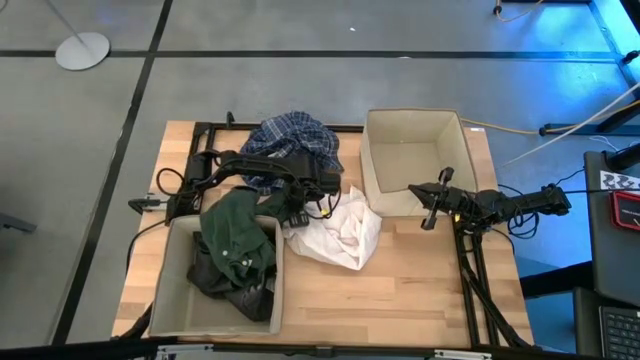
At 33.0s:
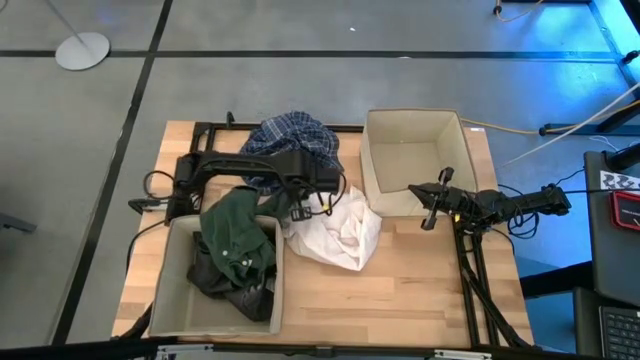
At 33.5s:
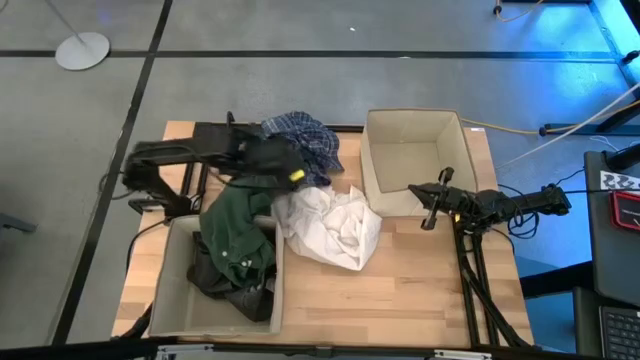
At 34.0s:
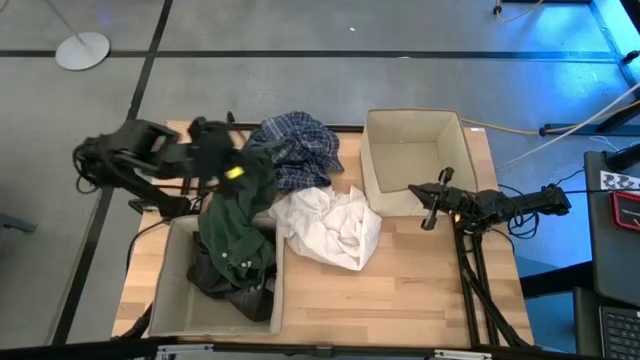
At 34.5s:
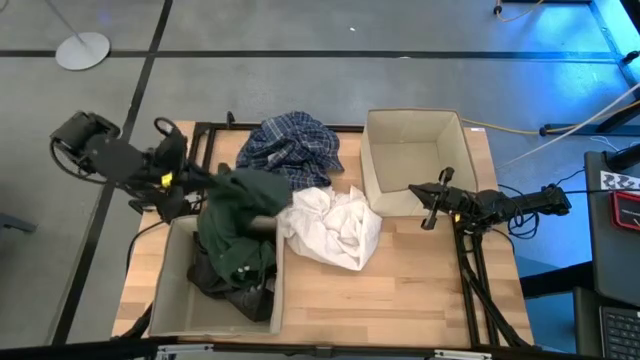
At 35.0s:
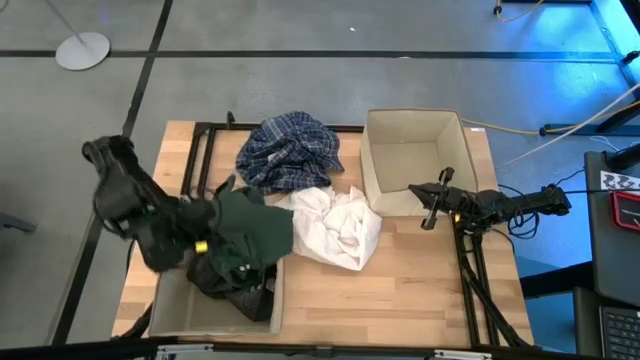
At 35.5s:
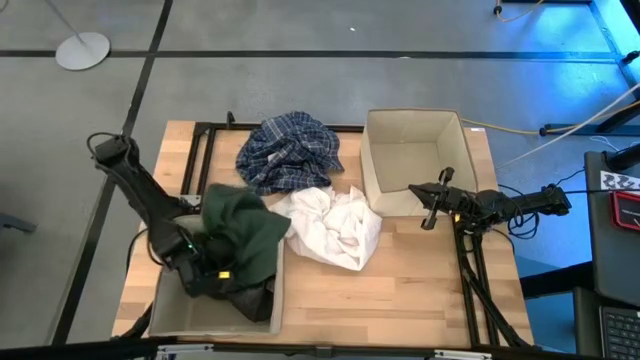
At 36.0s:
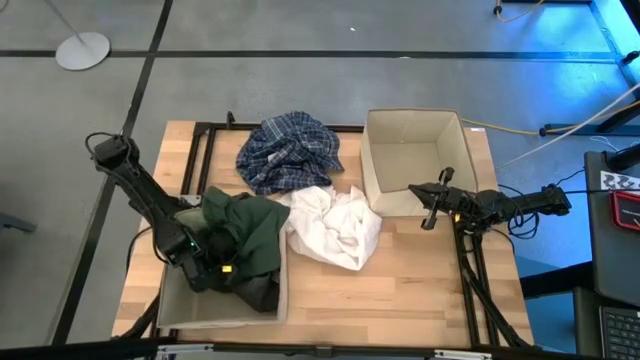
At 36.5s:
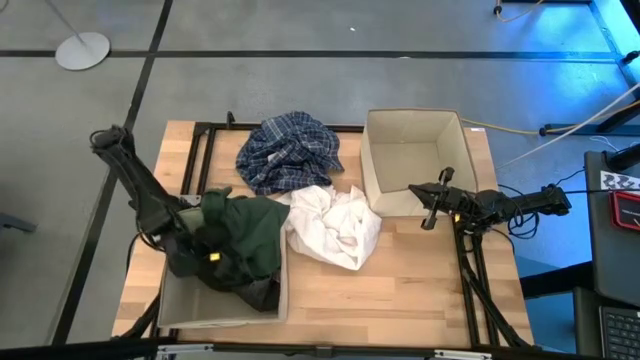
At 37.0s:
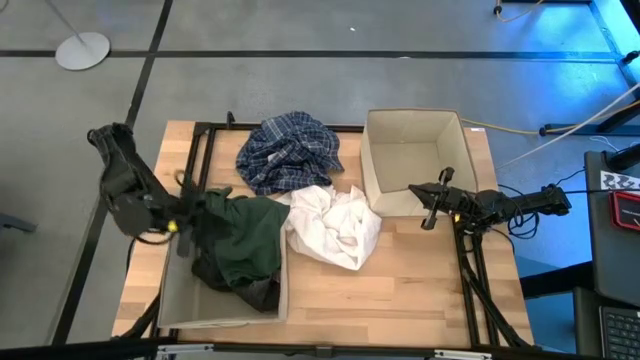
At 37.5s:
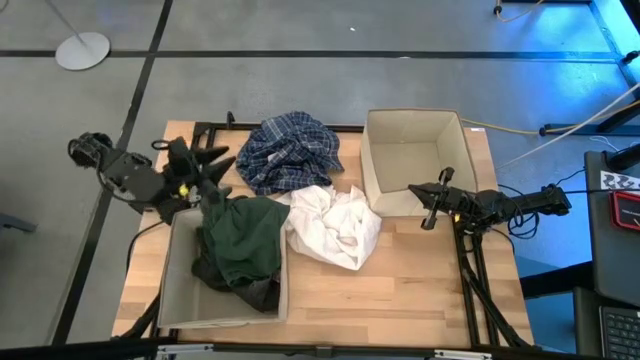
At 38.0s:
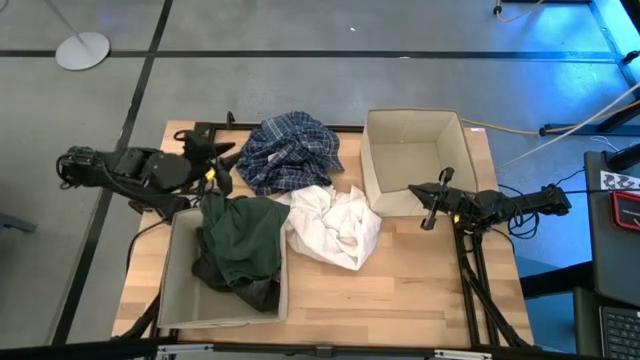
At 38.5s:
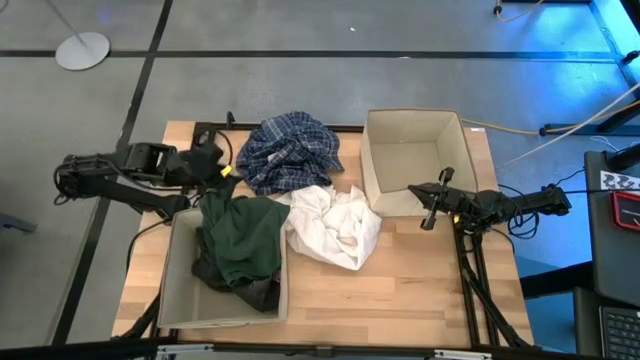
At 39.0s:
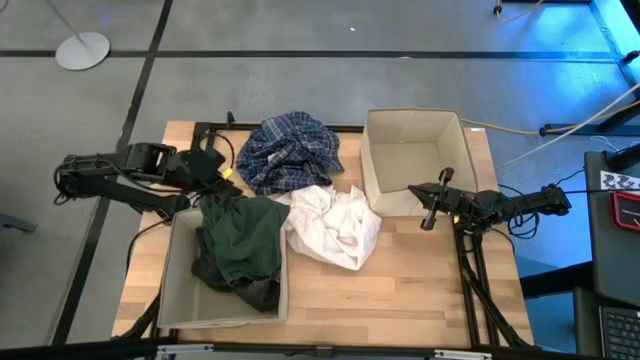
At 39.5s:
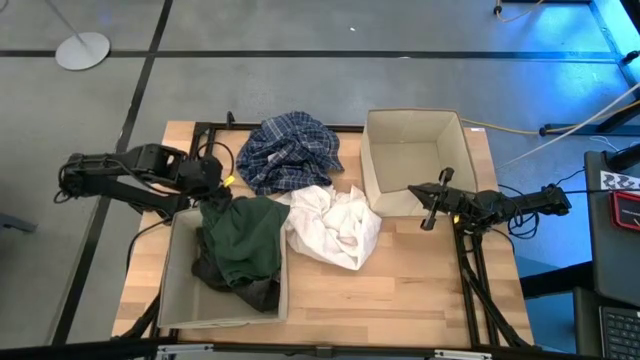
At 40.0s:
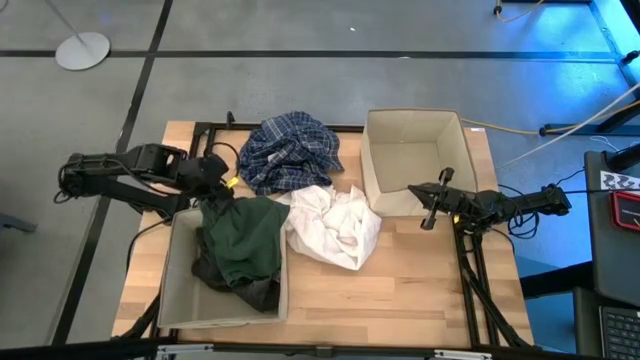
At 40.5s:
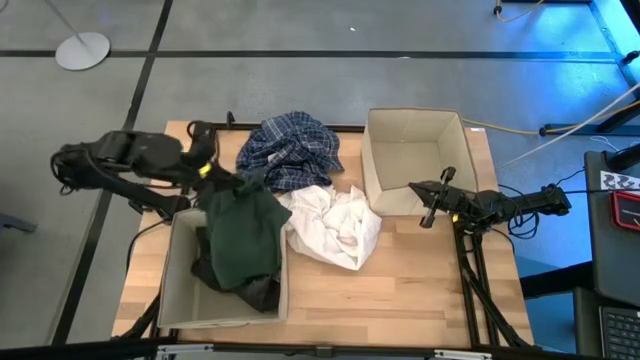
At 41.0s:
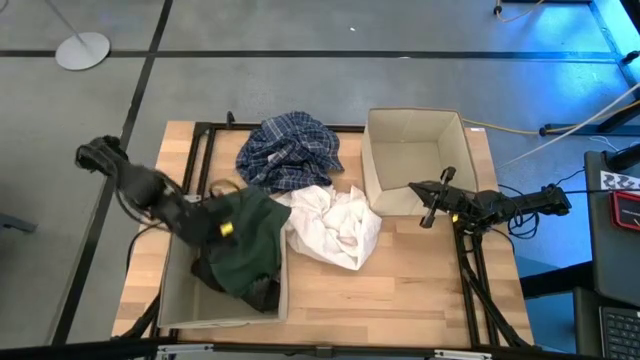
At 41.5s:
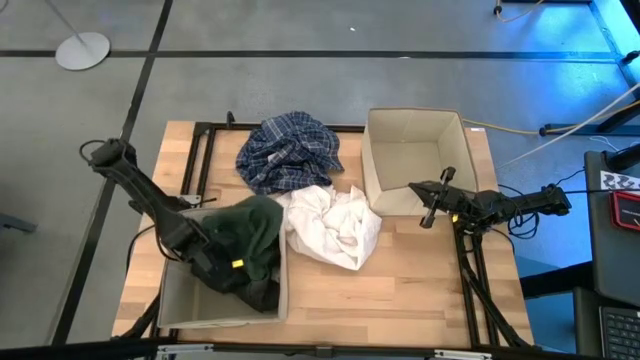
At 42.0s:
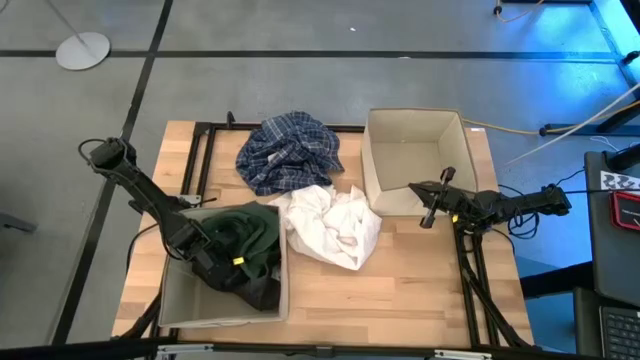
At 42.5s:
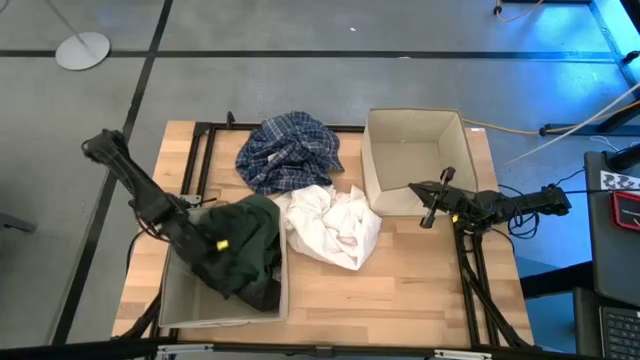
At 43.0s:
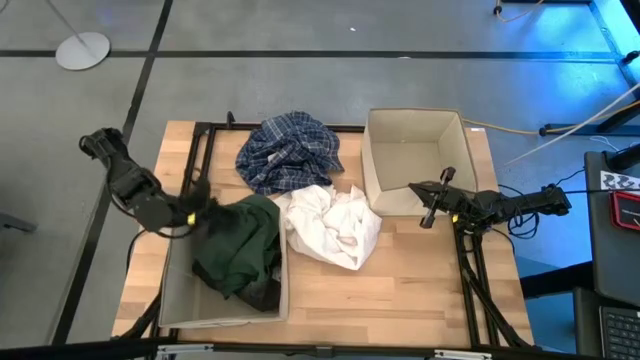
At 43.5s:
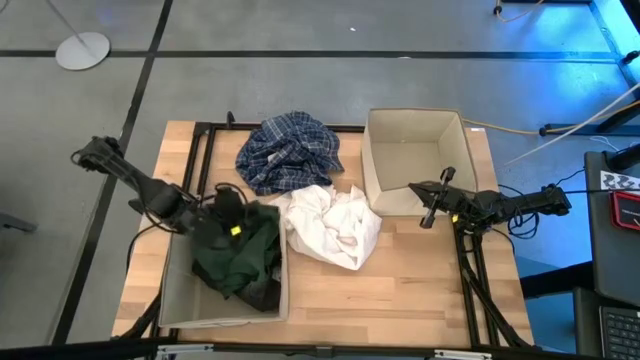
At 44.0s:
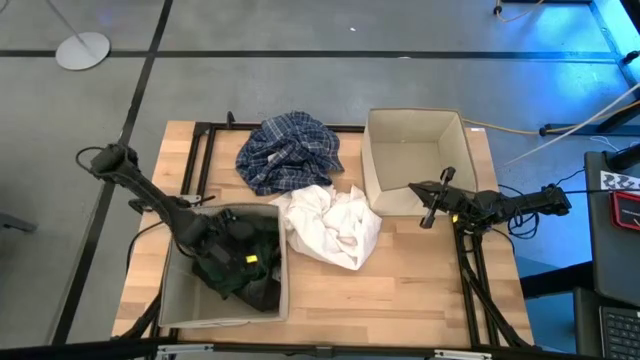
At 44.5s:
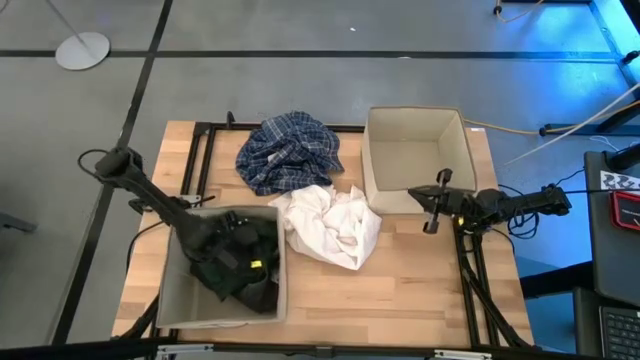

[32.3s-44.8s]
Task: Sort clothes
Put the green polo shirt into the left brown laundry organizer

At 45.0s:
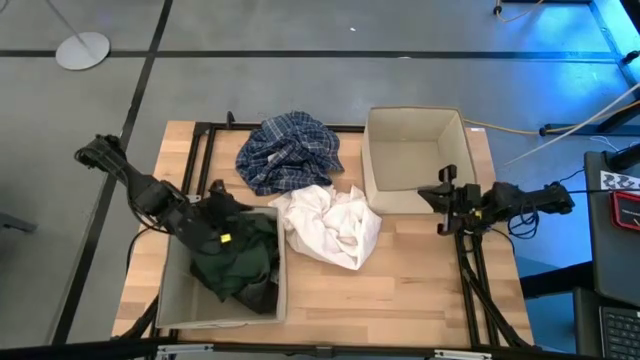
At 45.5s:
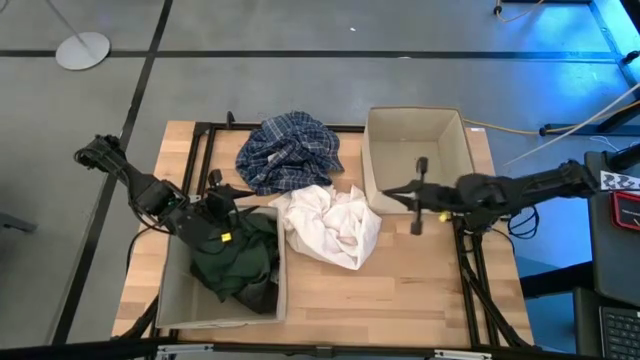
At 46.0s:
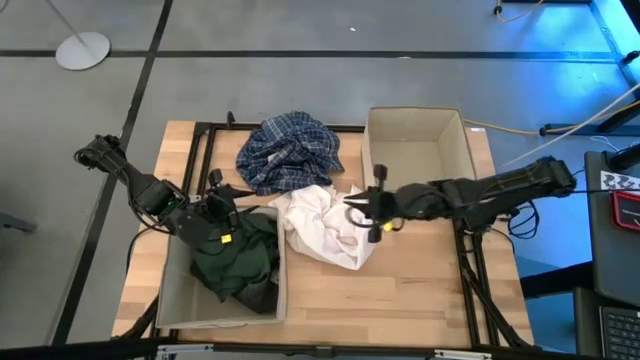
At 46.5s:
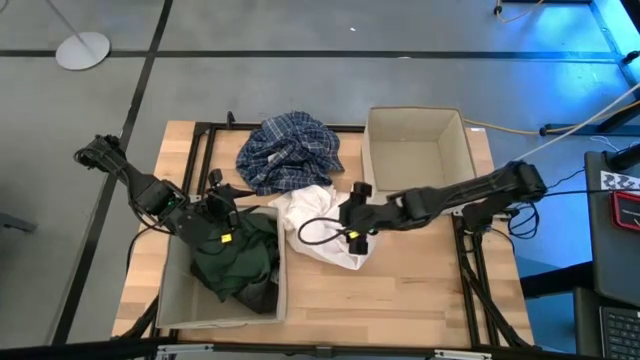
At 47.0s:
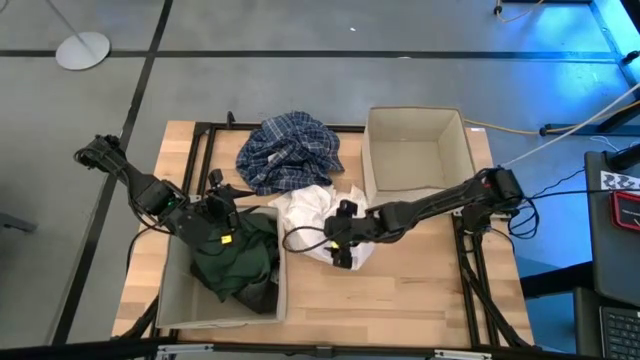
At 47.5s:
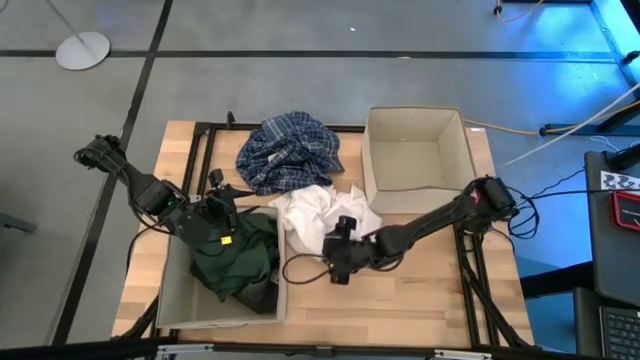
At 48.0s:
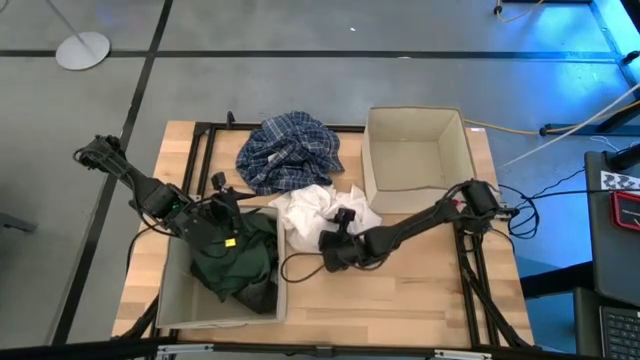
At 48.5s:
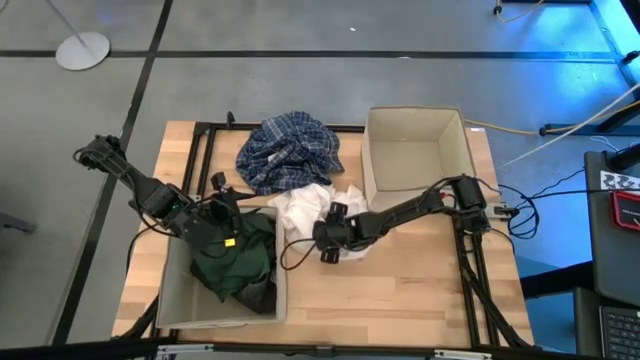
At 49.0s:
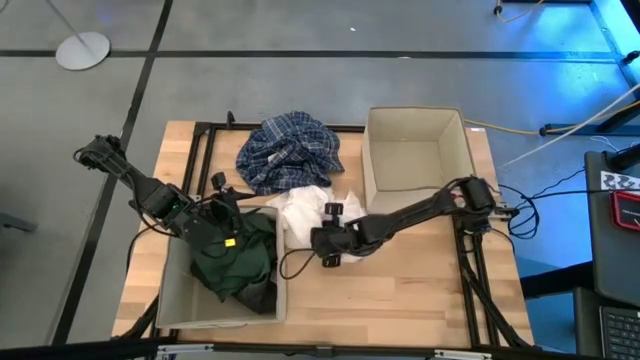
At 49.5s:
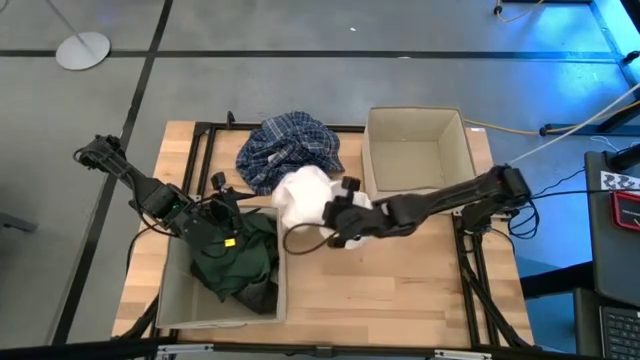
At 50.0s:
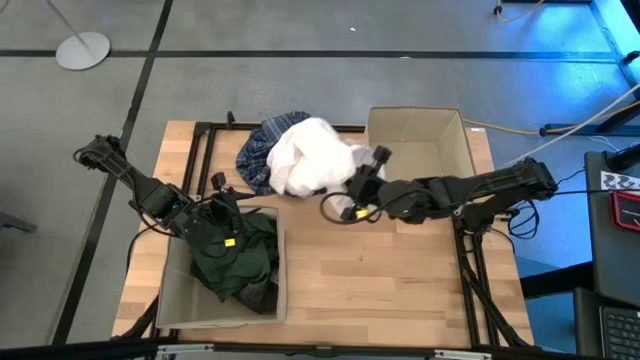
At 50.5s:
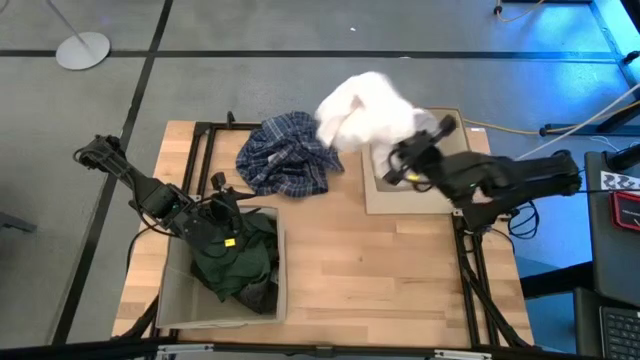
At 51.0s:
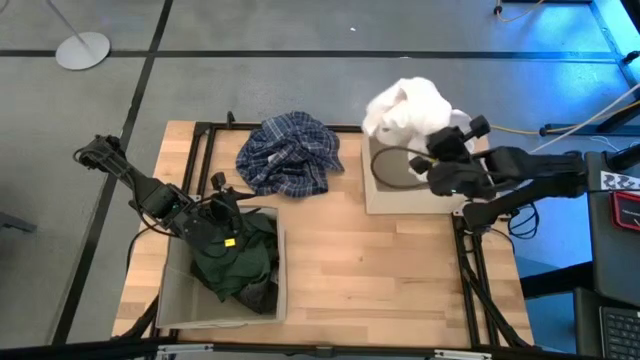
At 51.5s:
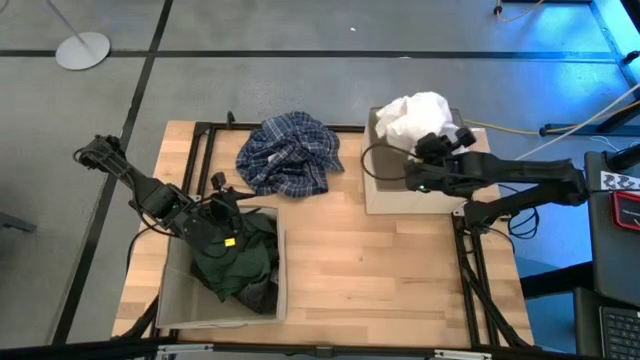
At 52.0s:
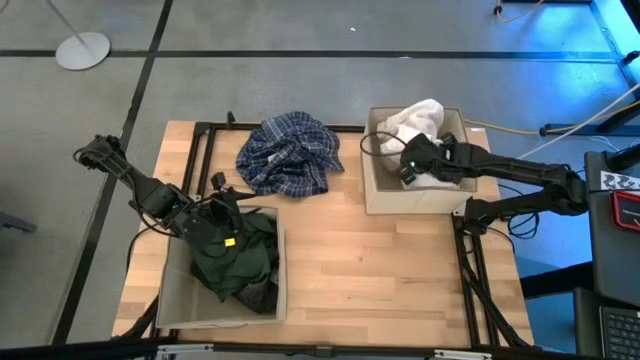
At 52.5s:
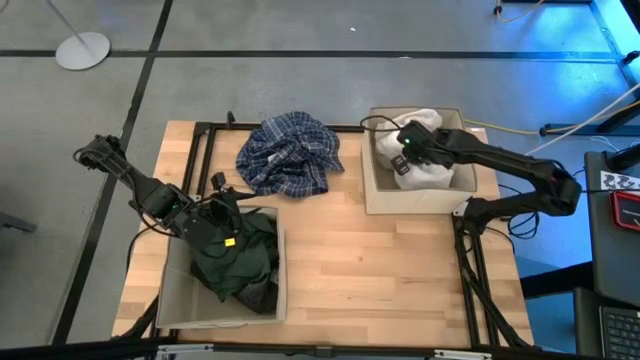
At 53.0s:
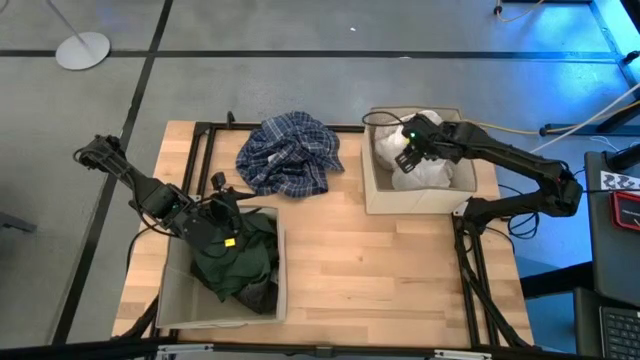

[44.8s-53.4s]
Put the white polo shirt into the right laundry organizer
